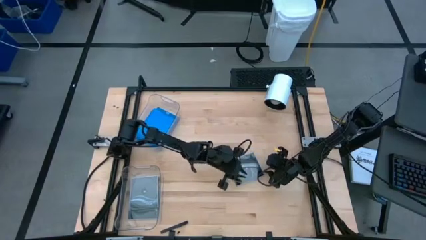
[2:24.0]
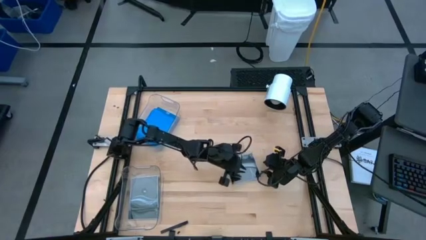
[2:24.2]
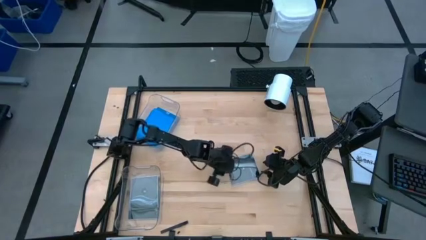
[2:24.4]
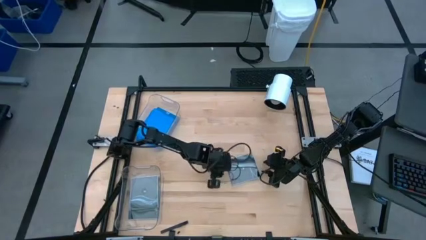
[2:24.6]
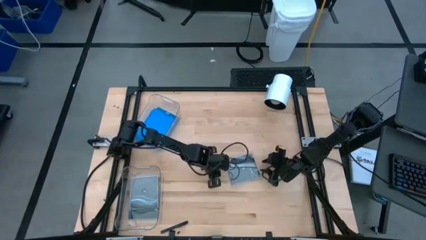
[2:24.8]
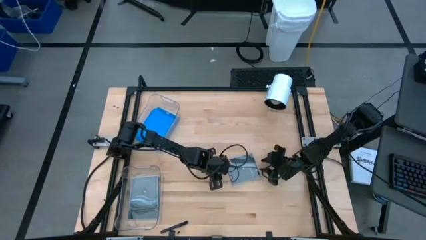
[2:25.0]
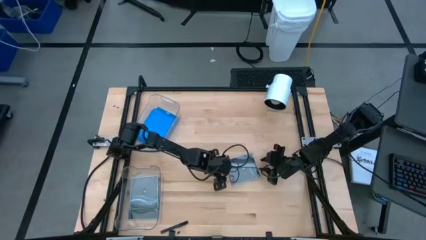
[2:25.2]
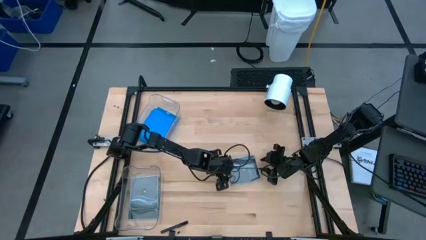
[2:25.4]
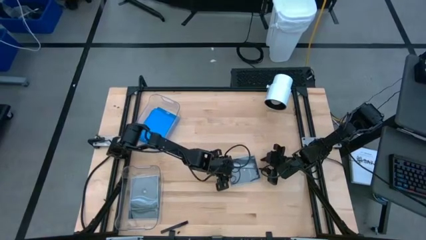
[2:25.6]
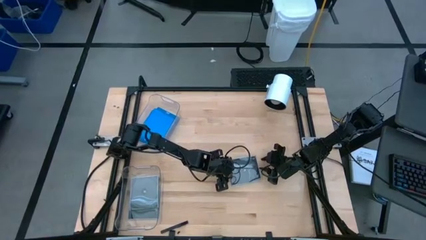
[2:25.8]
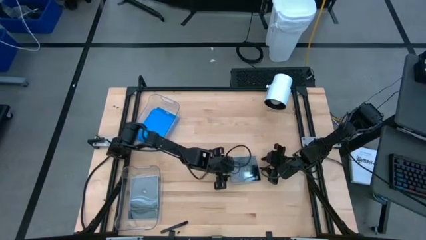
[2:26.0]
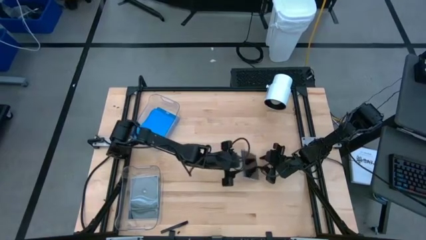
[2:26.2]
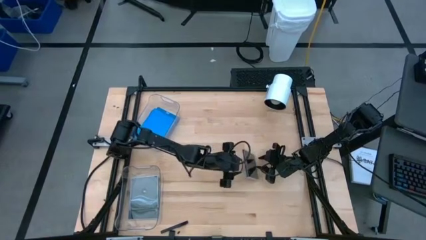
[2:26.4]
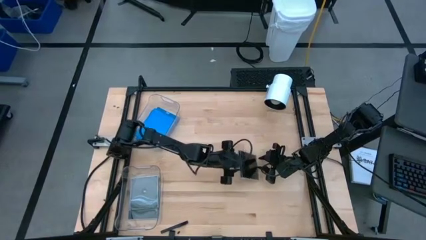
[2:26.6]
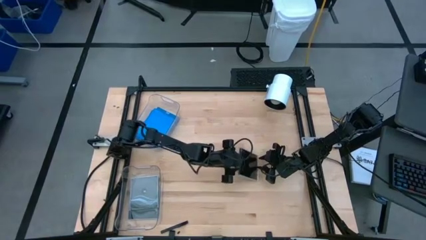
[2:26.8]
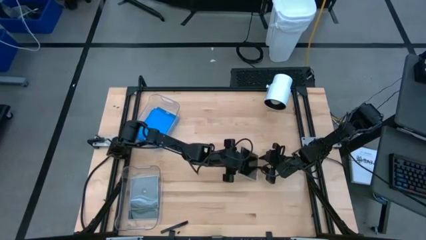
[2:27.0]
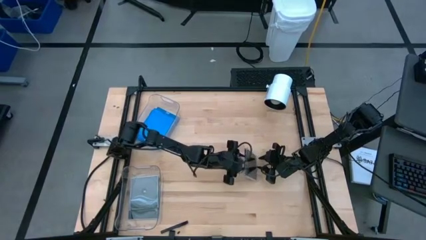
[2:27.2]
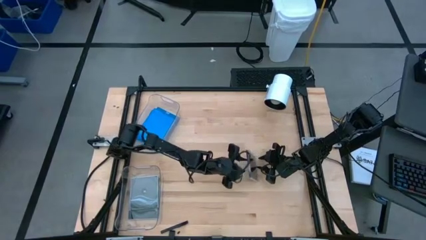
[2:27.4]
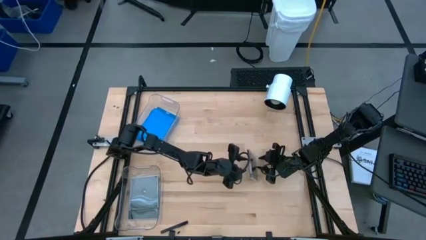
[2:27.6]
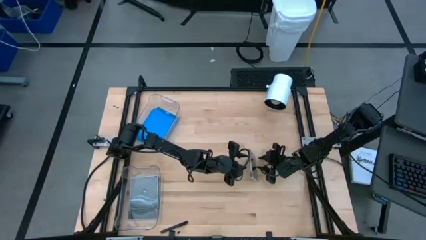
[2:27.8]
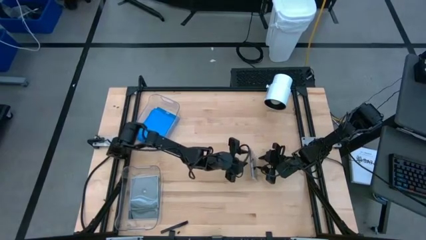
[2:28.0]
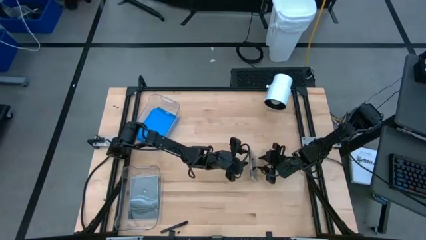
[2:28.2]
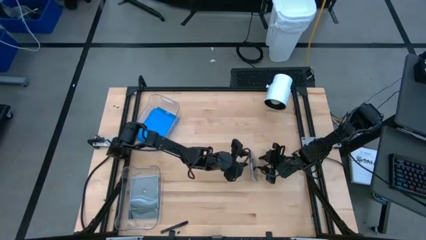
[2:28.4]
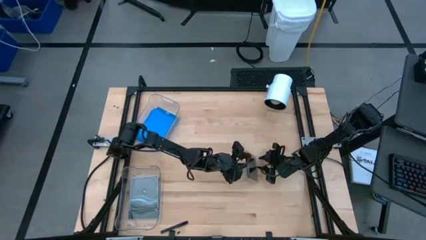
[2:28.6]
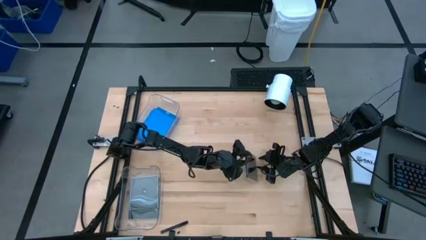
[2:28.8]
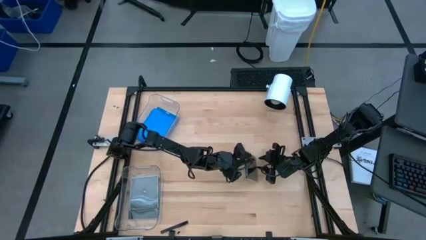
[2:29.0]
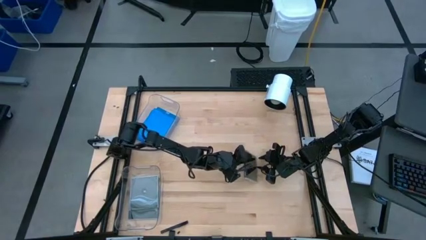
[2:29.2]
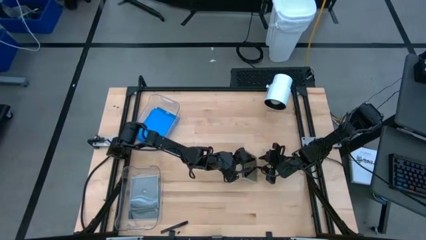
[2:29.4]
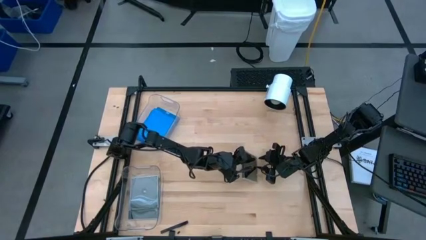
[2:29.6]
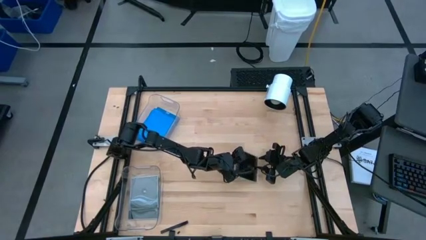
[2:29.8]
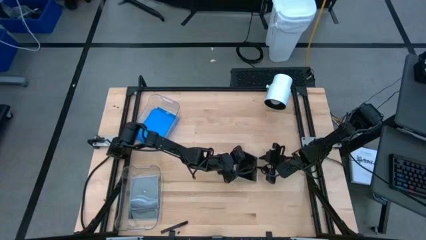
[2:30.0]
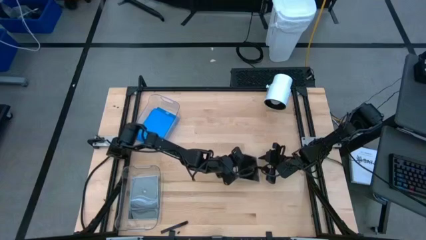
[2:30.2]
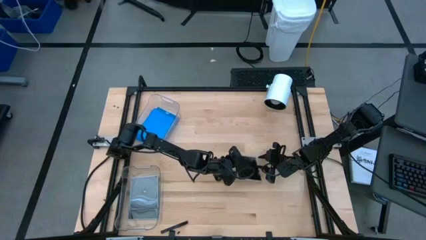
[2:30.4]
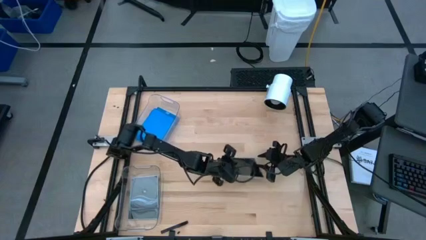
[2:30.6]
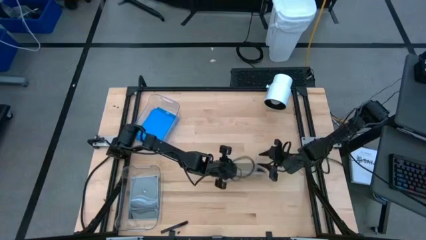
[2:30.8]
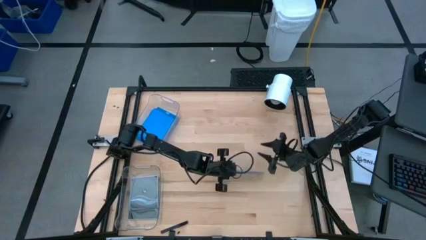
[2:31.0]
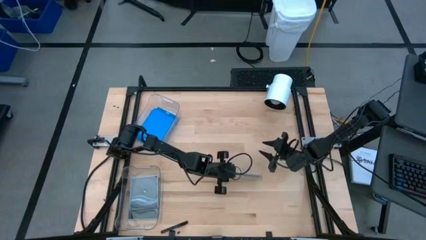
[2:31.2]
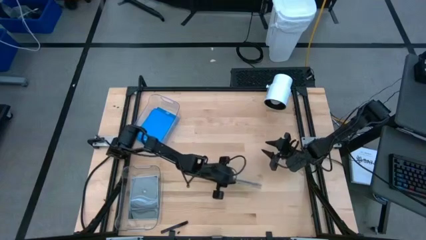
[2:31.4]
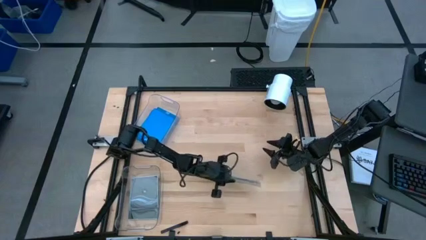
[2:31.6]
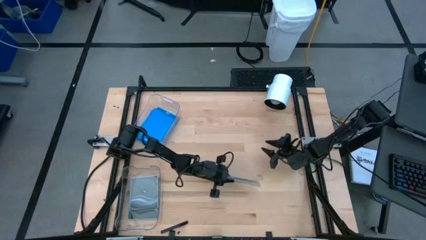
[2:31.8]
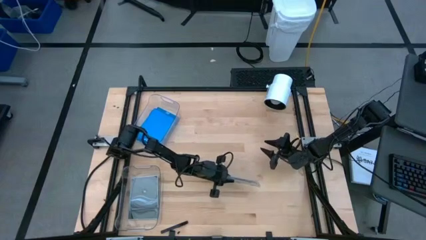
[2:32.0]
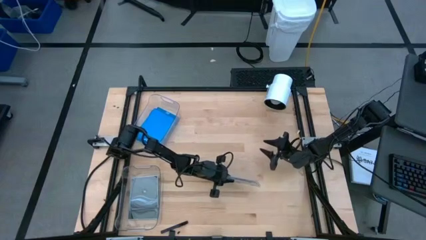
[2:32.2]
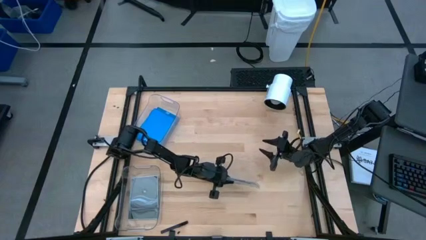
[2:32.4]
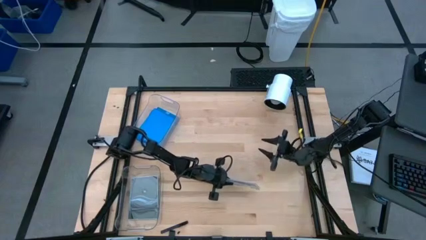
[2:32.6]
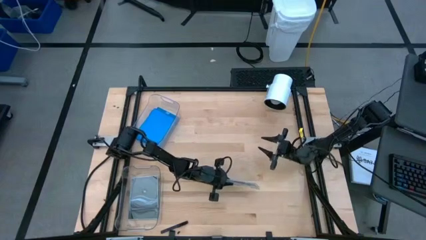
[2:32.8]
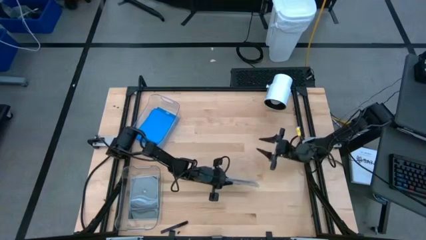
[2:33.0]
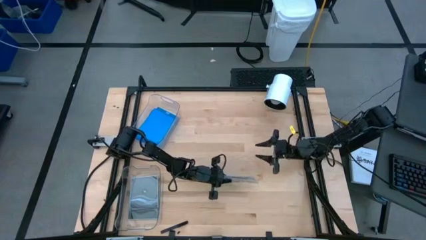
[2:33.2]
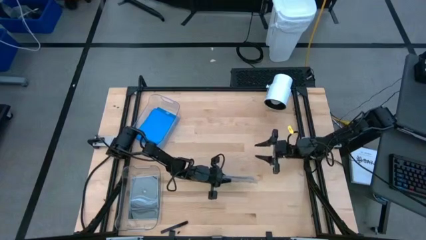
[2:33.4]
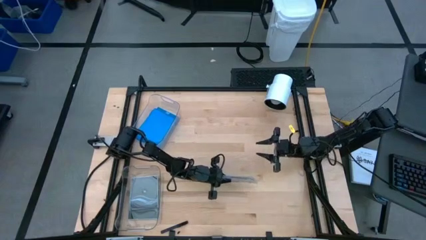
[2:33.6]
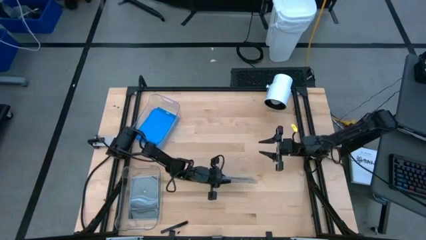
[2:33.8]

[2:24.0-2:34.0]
Task: Pick & place jewel cases by type
Put the black CD case into the bottom transparent bin

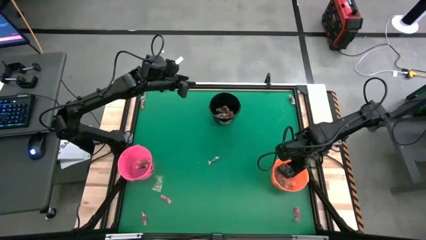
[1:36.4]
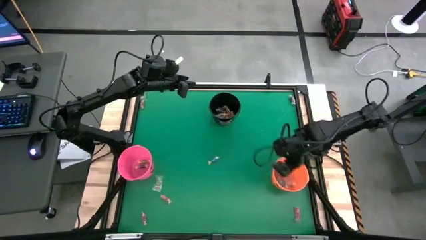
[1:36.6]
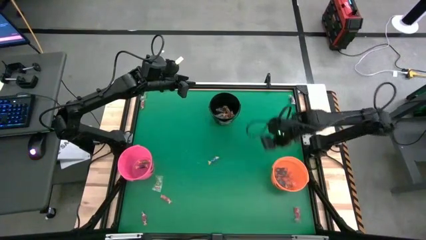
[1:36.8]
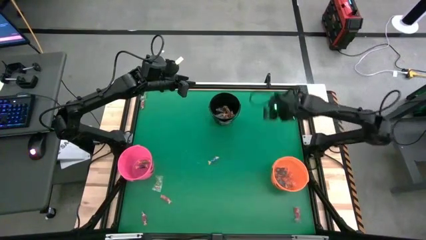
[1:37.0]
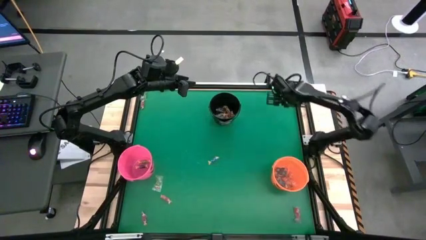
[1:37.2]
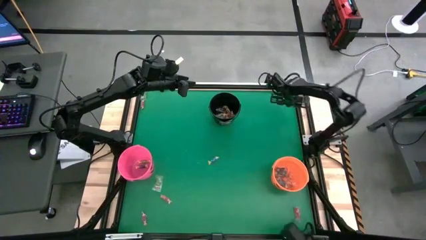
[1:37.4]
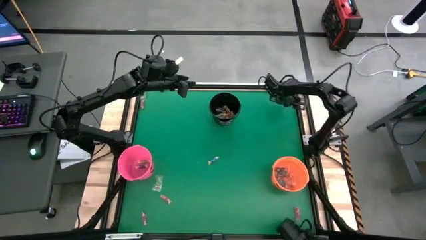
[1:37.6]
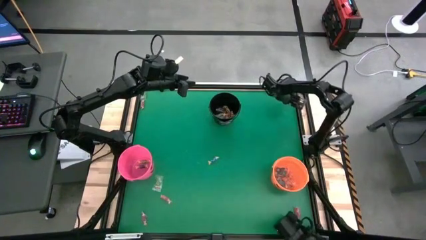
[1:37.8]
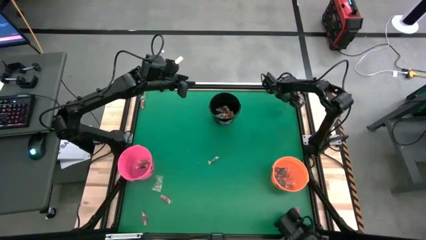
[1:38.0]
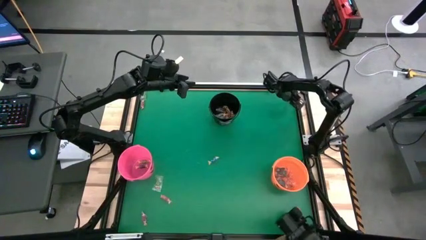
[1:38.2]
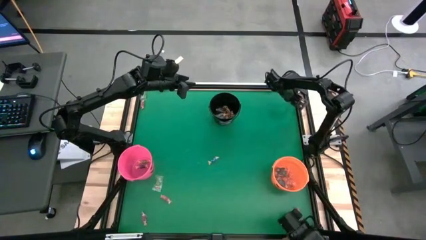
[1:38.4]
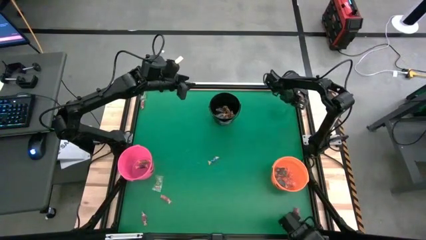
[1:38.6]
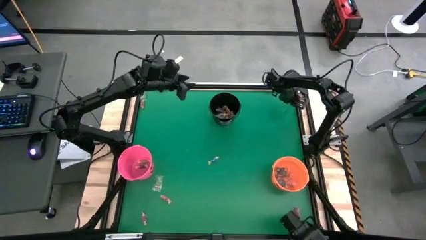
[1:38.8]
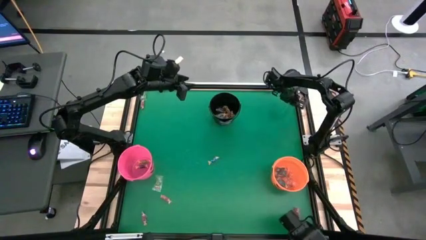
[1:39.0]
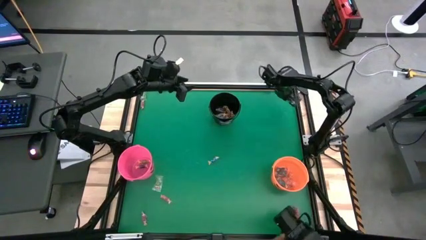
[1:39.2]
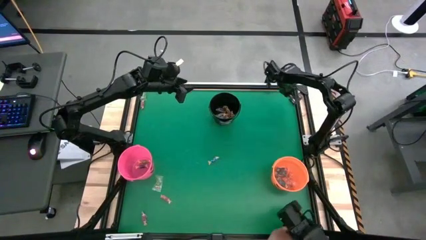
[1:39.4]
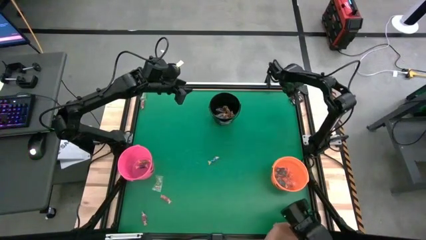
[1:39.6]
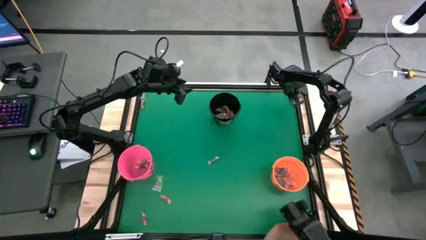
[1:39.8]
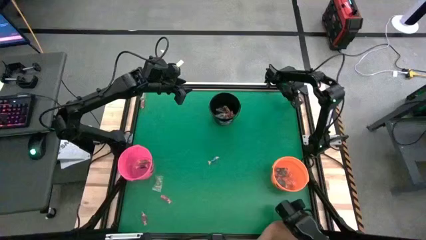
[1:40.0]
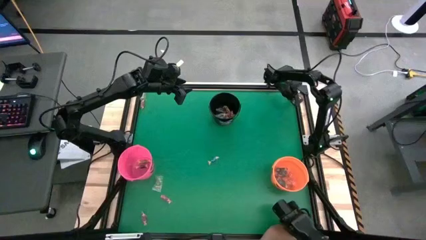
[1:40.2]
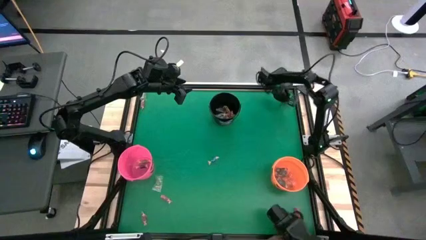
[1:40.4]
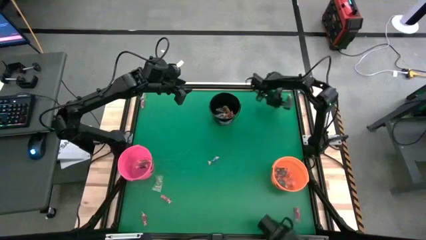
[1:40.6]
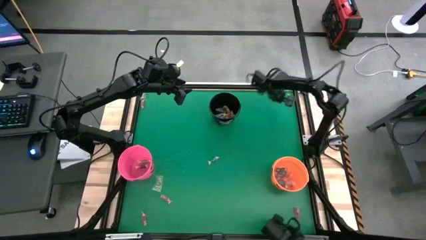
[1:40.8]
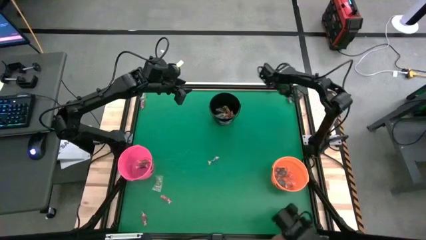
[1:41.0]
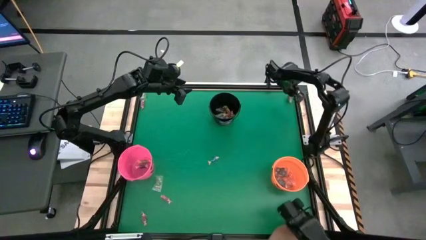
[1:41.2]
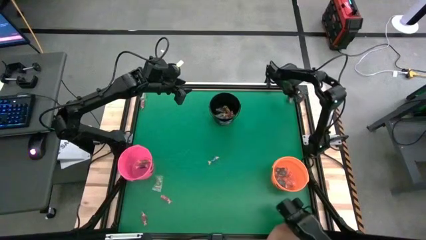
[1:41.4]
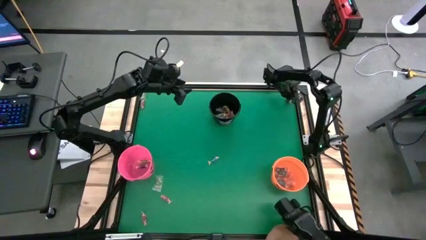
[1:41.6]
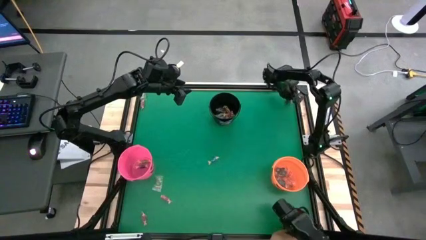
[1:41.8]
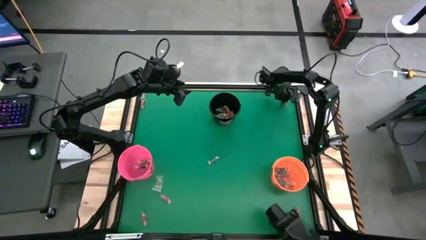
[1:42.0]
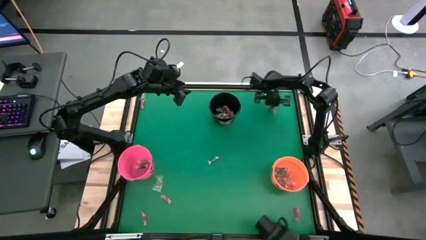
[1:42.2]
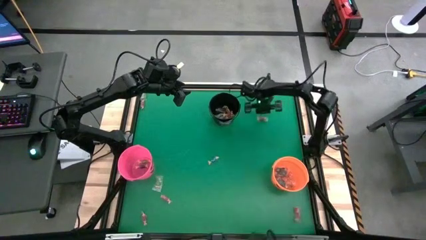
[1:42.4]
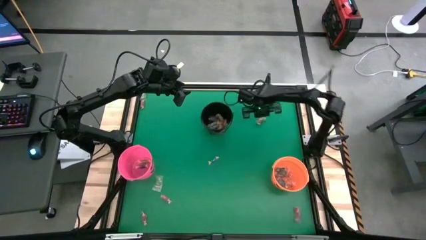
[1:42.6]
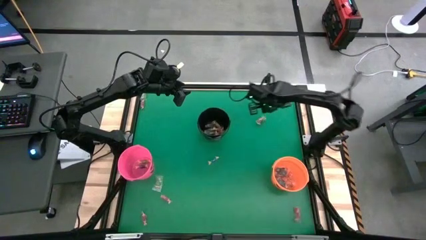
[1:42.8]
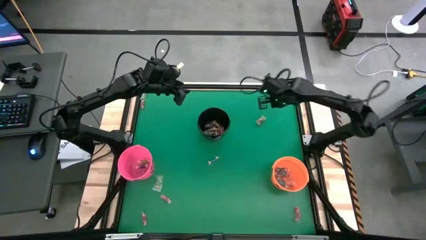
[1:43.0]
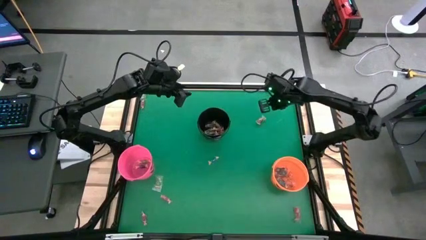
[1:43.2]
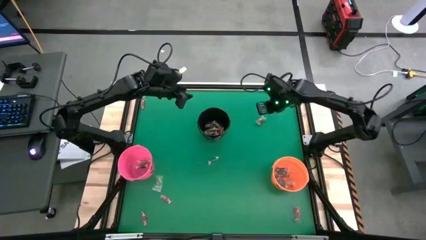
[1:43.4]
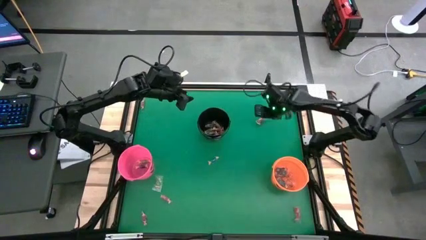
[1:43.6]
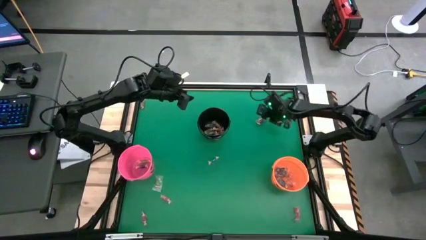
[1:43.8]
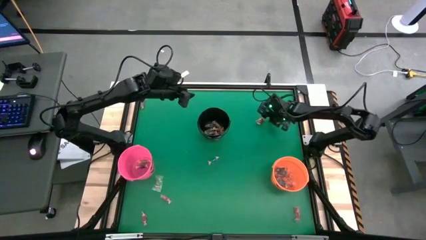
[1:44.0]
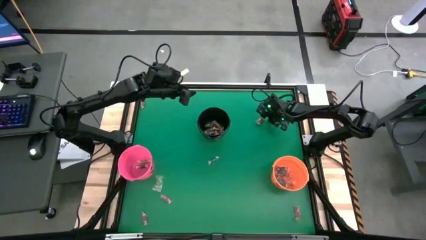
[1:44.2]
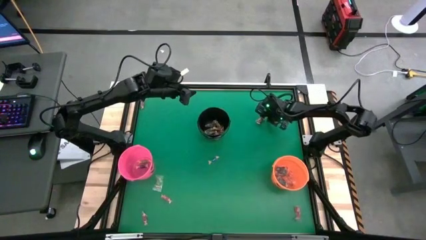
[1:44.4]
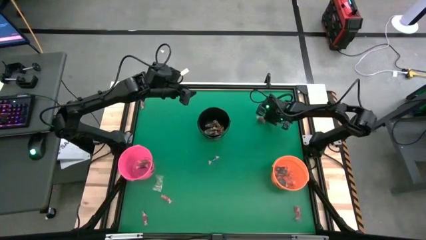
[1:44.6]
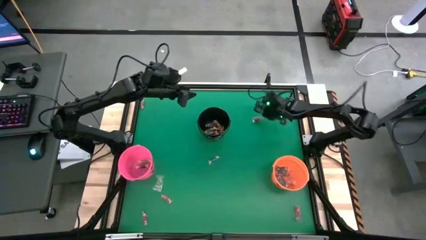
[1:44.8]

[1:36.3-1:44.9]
Task: Sort candy by brand, put in halloween buckets
Put the transparent candy into the black bucket
